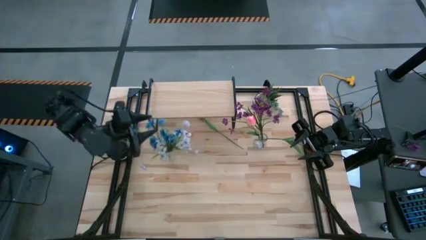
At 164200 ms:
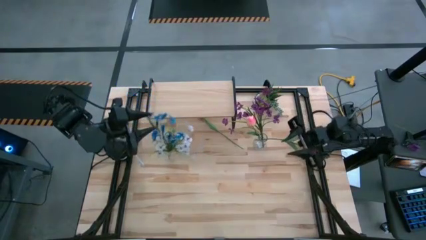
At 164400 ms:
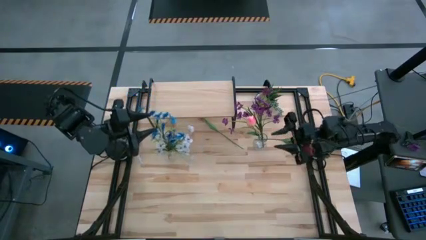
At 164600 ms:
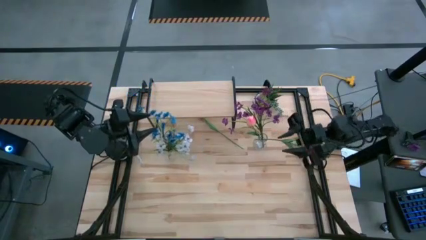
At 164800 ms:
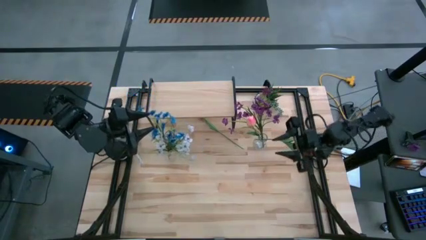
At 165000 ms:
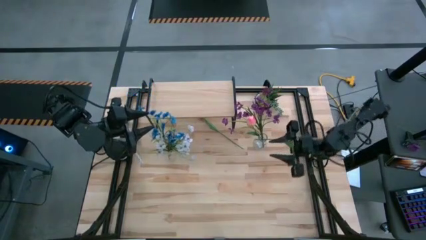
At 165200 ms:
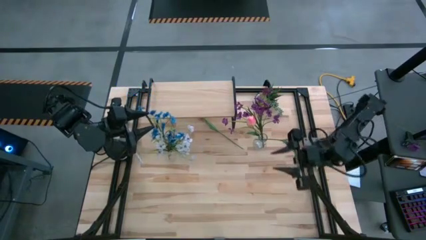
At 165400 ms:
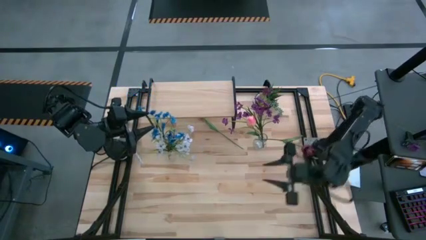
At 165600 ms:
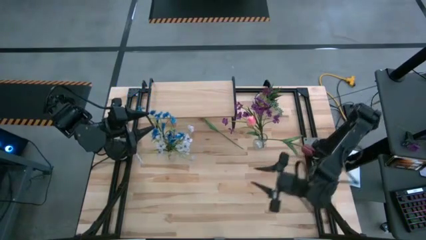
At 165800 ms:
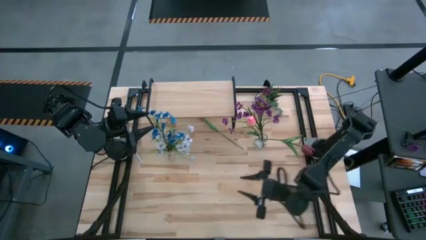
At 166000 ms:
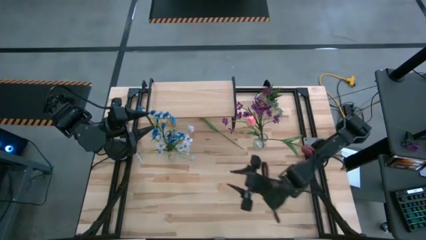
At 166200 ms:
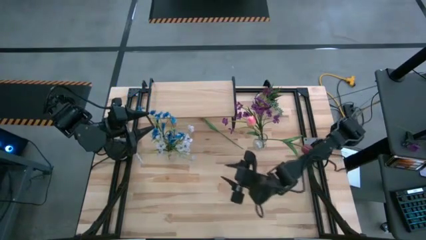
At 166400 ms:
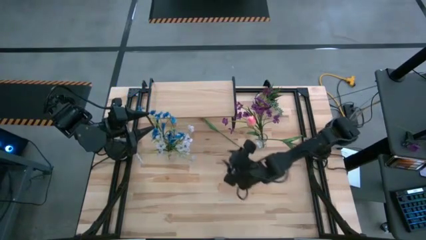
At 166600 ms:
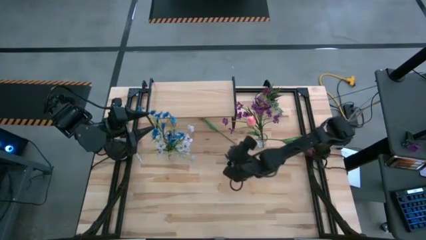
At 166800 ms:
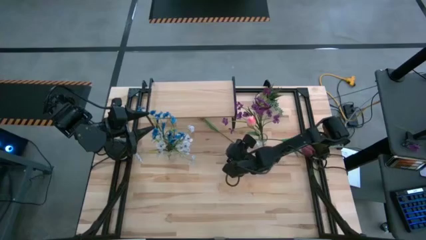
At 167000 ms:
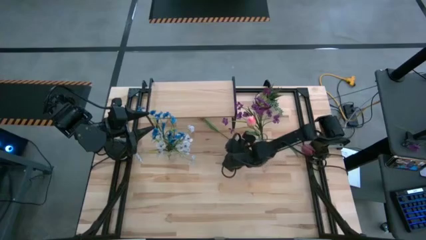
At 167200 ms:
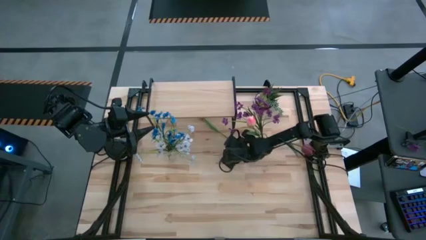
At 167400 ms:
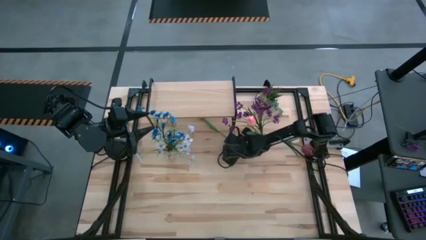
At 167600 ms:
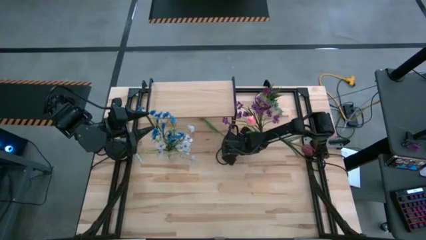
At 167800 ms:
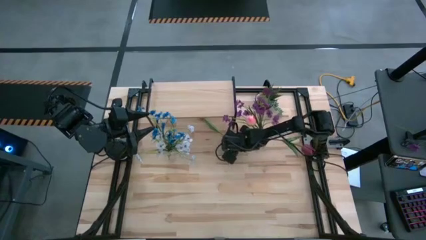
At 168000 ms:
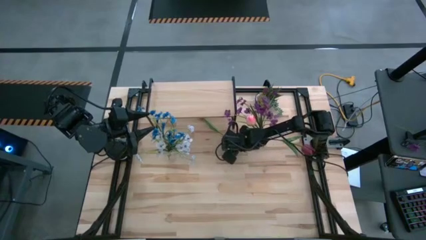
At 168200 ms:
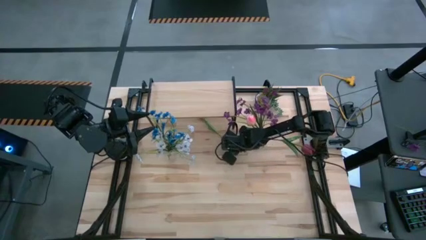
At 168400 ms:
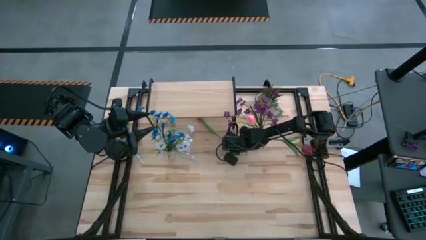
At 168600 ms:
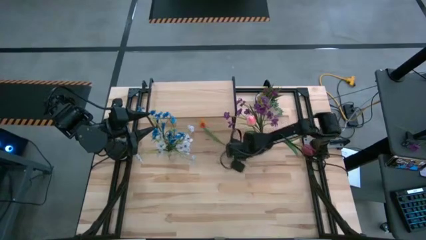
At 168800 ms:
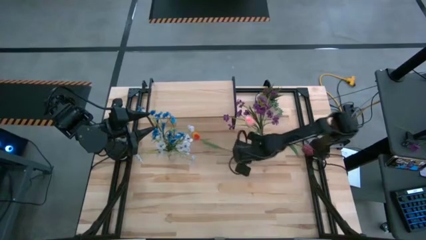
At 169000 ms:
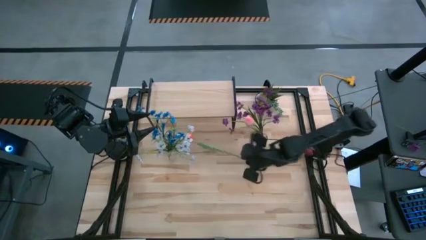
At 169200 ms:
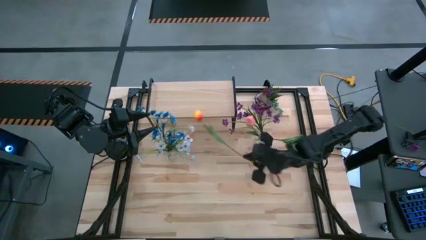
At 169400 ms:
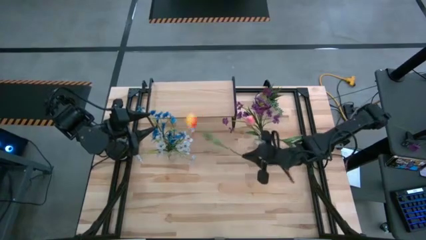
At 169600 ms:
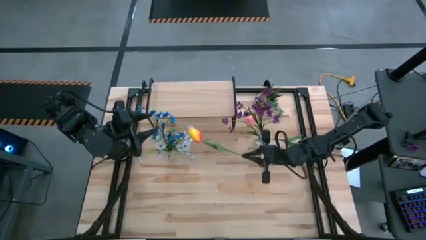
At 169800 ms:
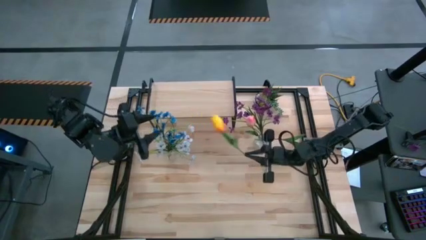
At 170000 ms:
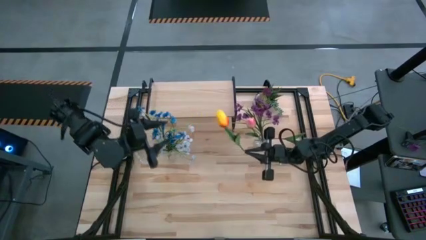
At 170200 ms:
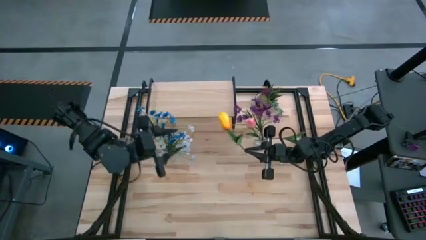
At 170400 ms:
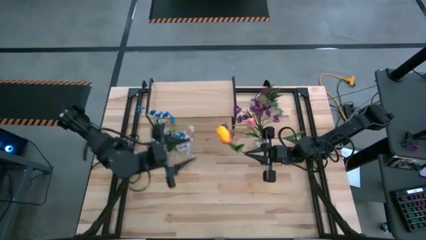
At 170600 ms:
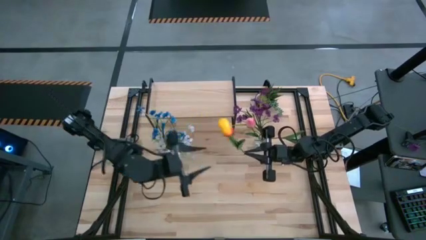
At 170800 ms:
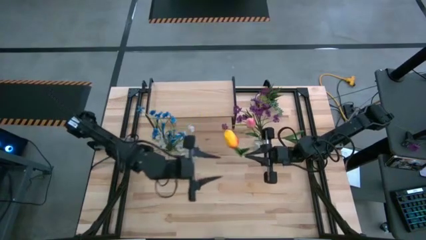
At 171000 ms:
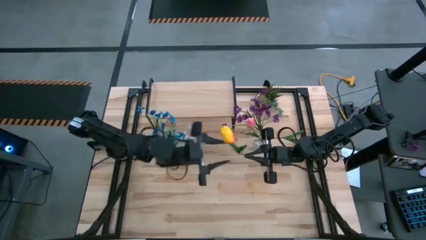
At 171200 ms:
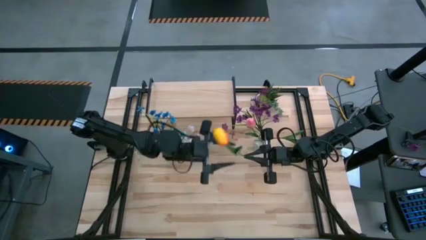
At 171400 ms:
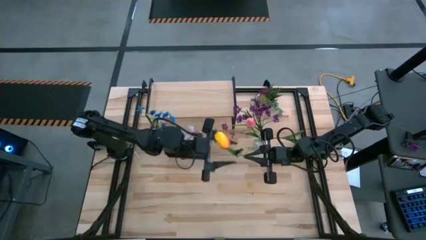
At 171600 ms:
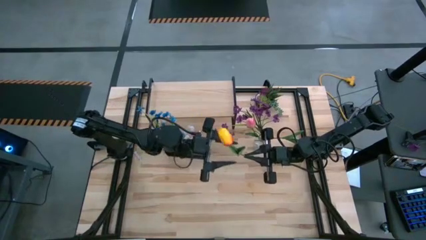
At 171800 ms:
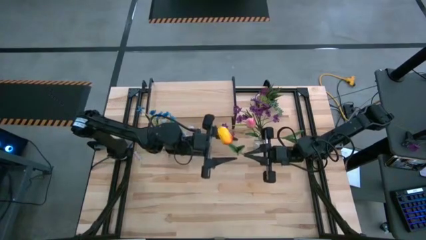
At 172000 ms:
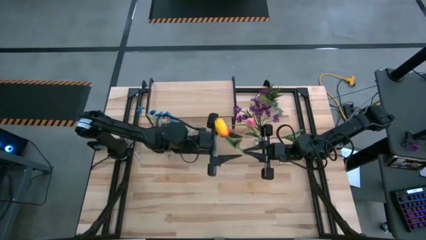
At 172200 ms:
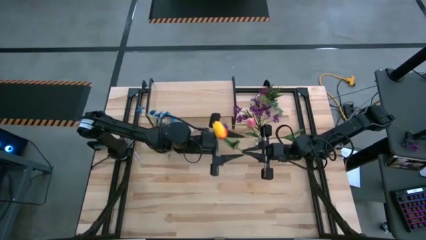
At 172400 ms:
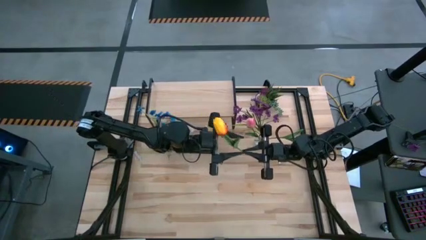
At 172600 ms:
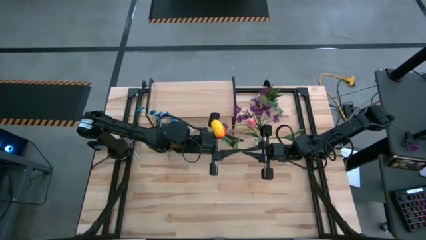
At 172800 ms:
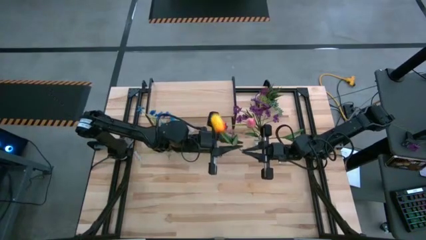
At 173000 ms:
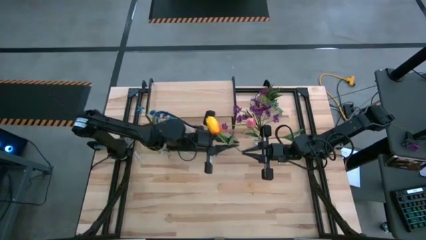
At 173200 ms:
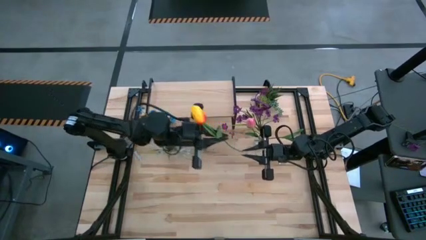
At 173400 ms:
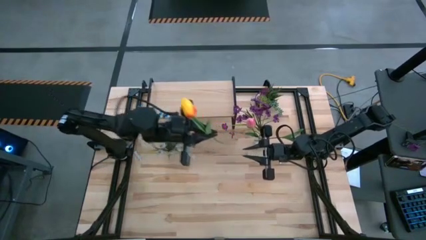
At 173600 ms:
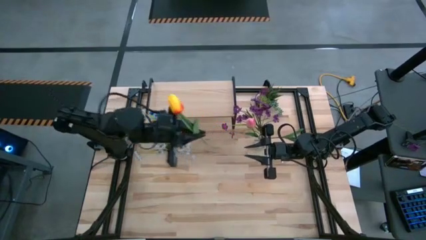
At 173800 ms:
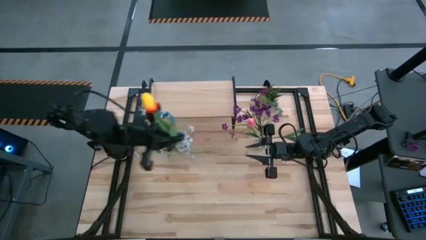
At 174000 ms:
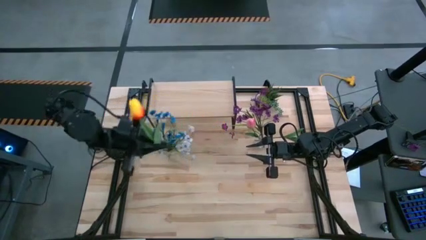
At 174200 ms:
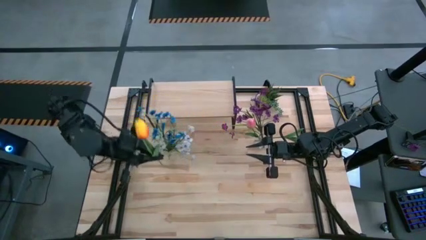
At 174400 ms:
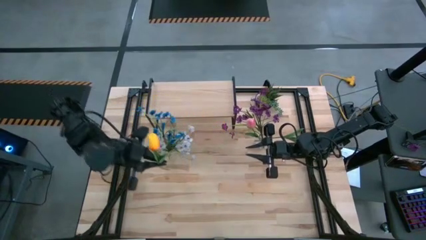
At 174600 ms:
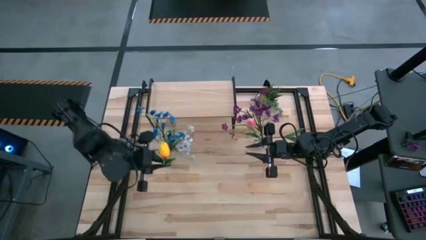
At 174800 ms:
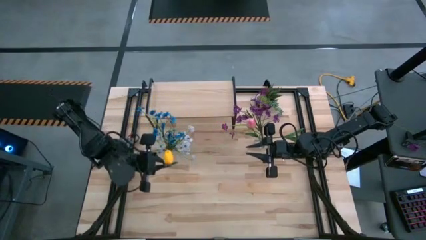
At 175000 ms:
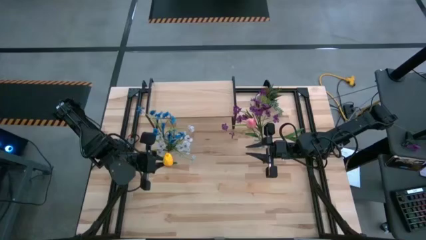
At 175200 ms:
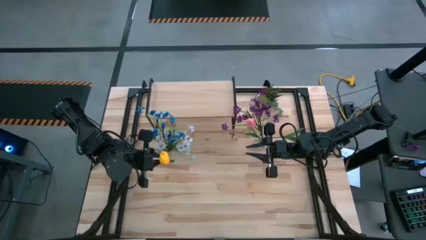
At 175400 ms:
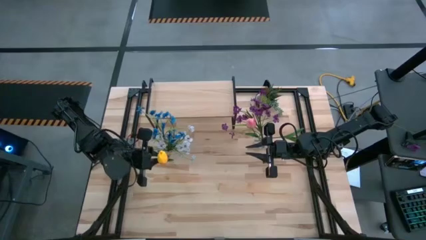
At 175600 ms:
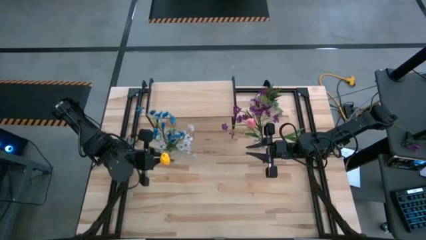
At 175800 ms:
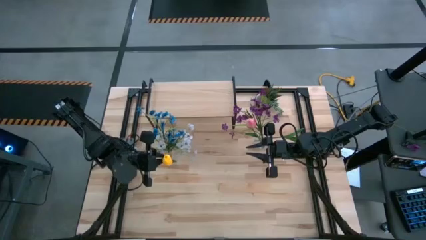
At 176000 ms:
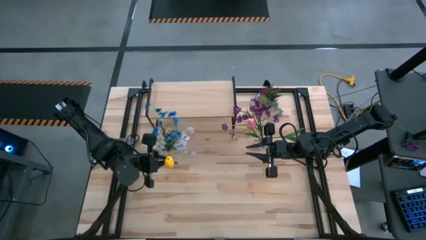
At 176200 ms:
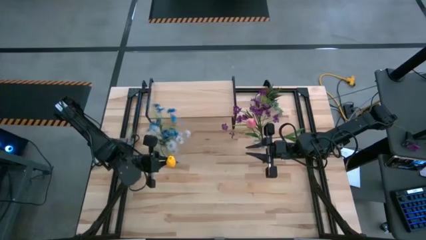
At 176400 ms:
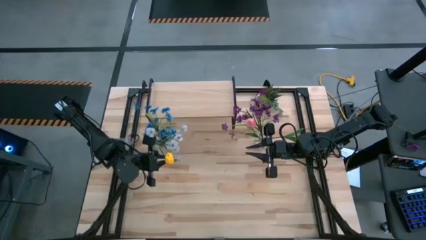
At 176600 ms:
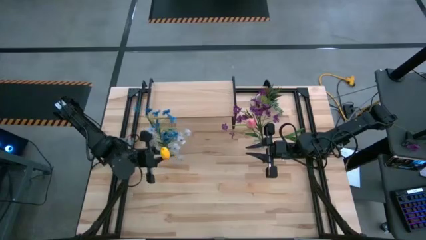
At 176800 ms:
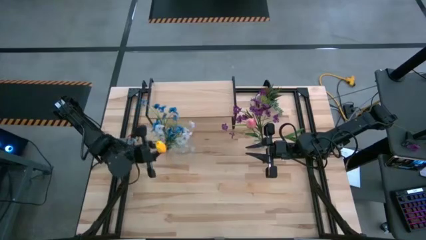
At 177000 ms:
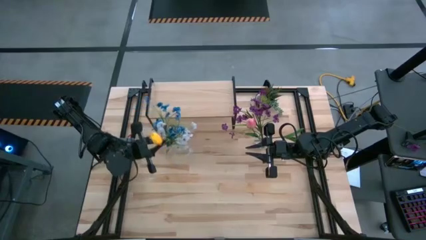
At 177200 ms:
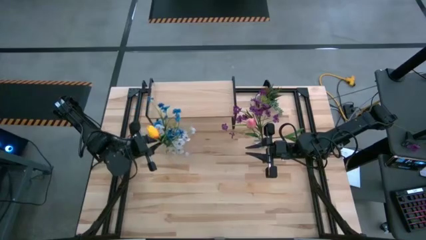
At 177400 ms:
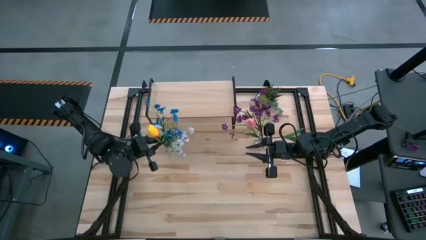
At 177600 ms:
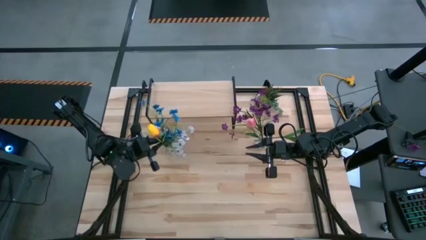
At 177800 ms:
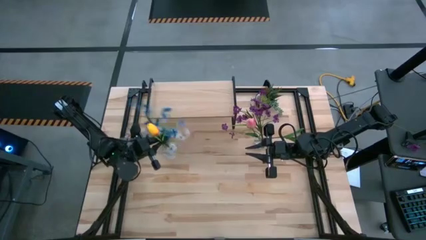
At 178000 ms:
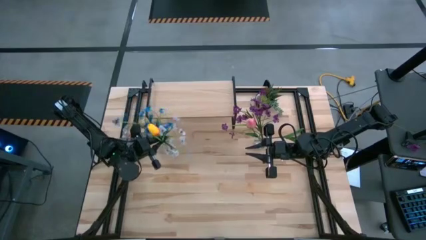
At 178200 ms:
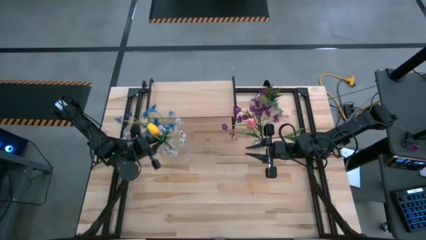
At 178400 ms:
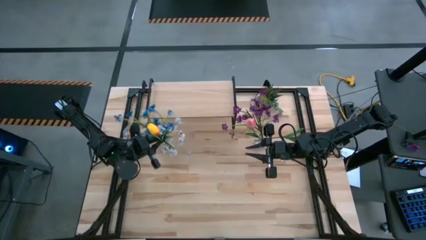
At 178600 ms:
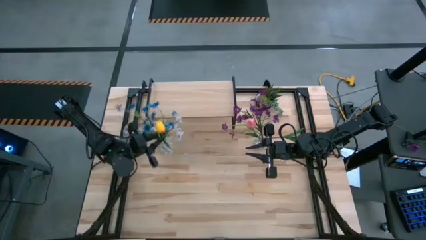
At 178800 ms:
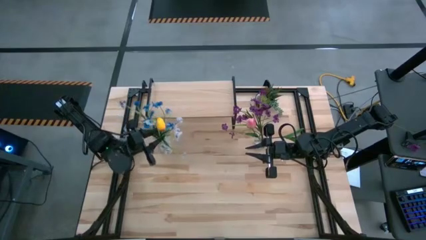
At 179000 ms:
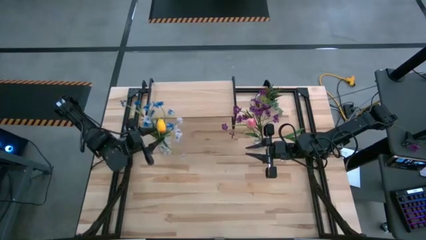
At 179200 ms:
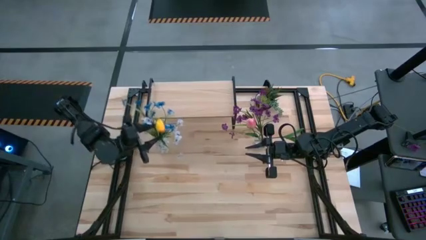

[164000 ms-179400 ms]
Task: Pick and place flowers into a vace then onto a shelf
Put the yellow flower into the left transparent vase
